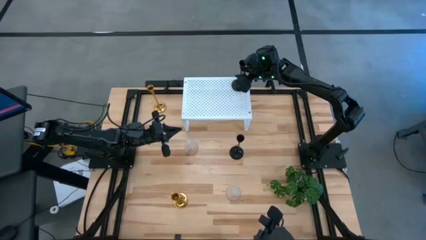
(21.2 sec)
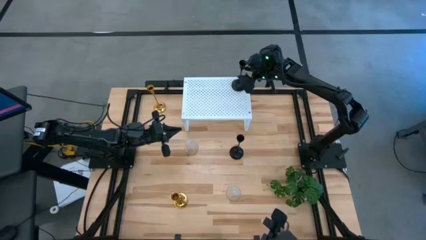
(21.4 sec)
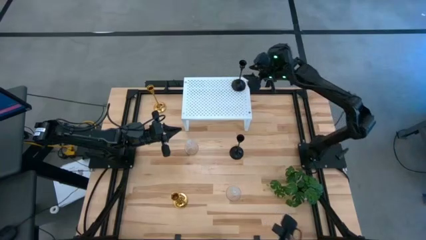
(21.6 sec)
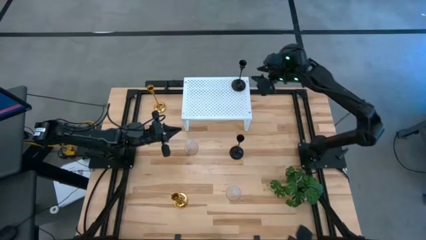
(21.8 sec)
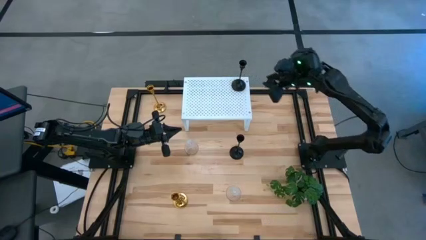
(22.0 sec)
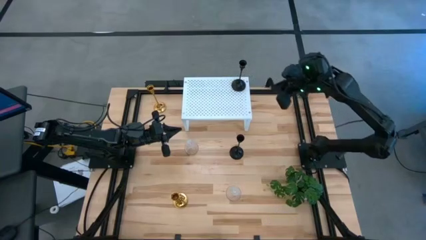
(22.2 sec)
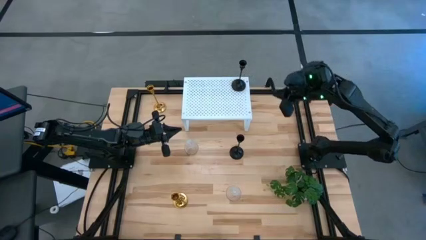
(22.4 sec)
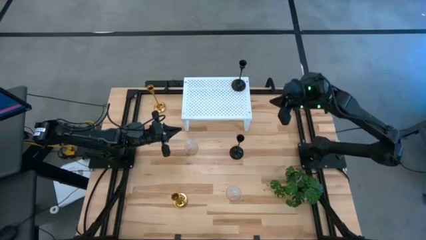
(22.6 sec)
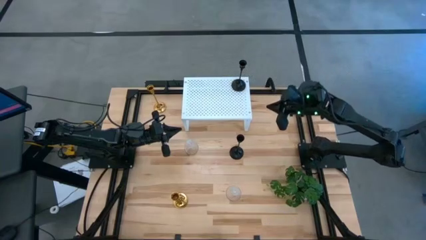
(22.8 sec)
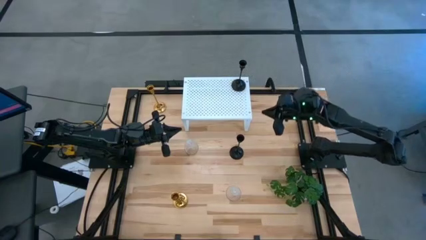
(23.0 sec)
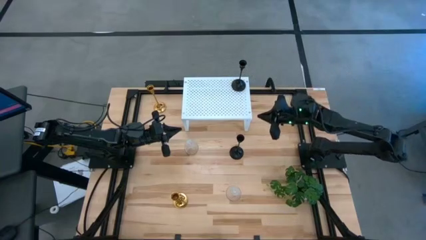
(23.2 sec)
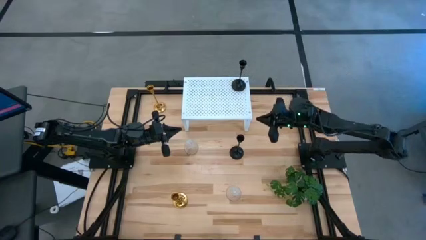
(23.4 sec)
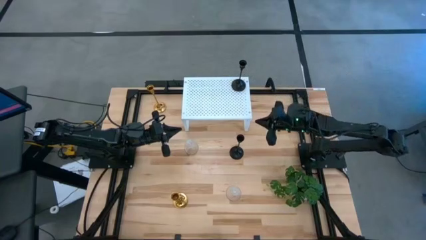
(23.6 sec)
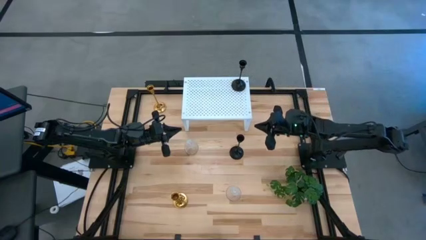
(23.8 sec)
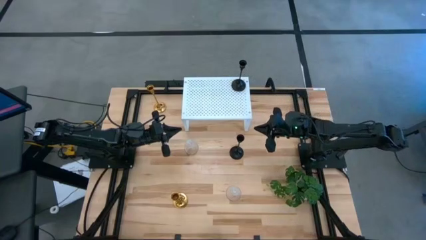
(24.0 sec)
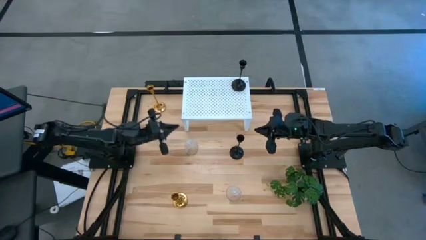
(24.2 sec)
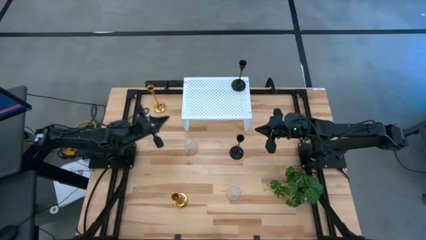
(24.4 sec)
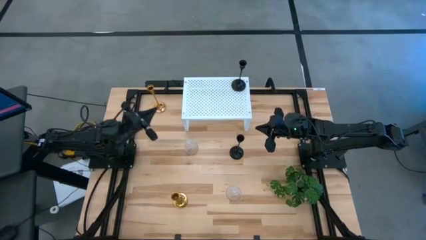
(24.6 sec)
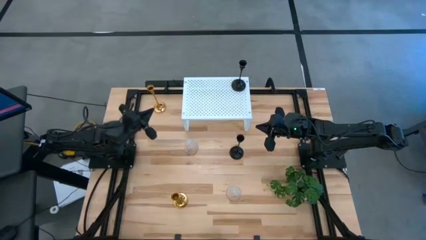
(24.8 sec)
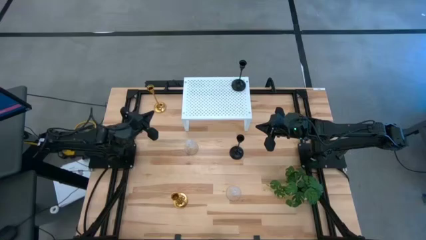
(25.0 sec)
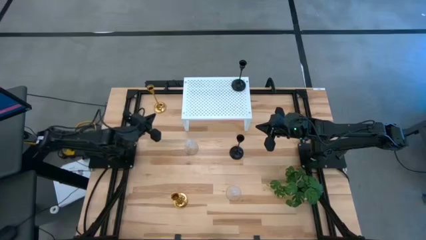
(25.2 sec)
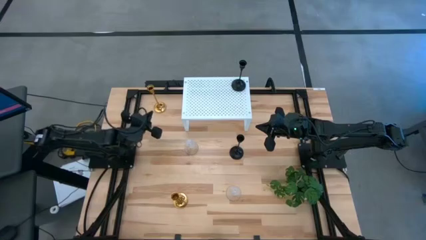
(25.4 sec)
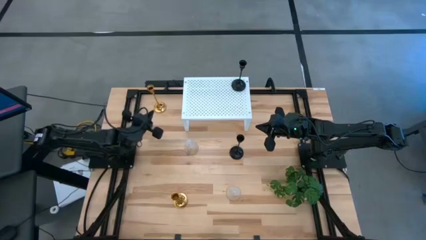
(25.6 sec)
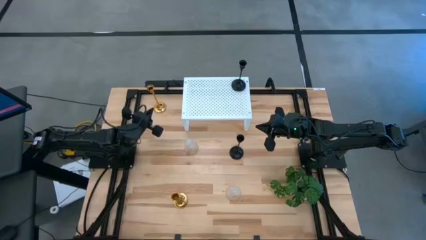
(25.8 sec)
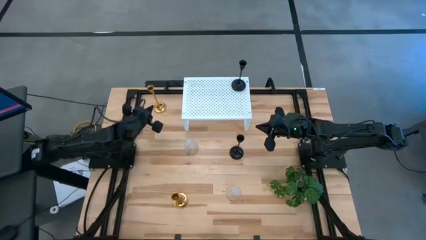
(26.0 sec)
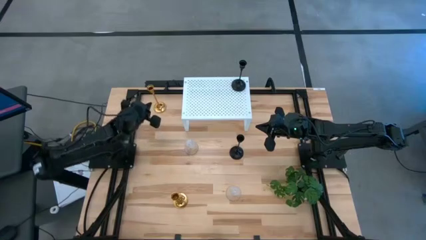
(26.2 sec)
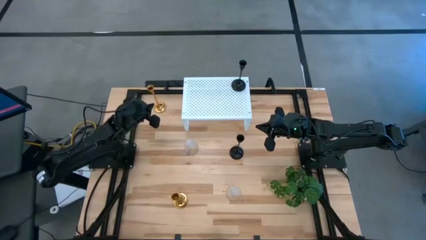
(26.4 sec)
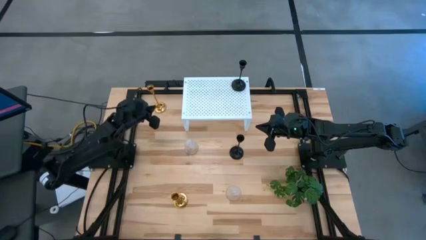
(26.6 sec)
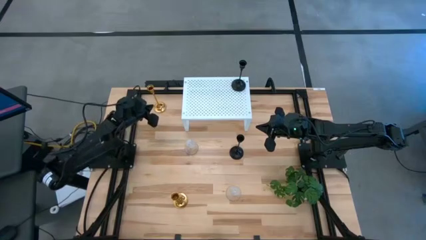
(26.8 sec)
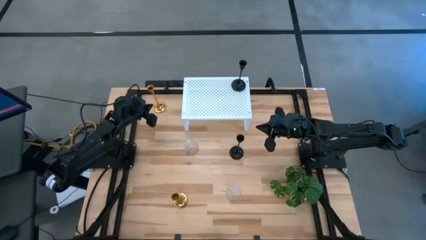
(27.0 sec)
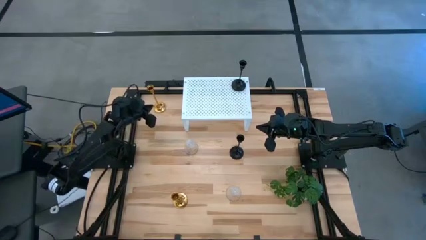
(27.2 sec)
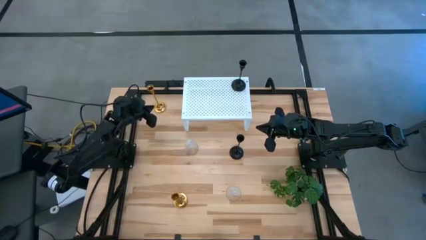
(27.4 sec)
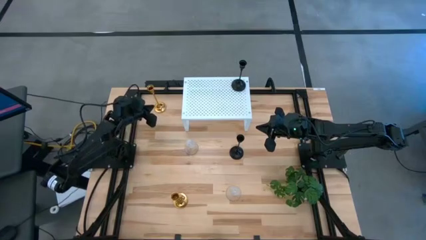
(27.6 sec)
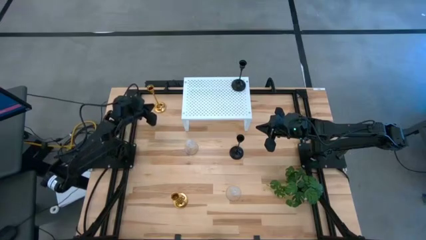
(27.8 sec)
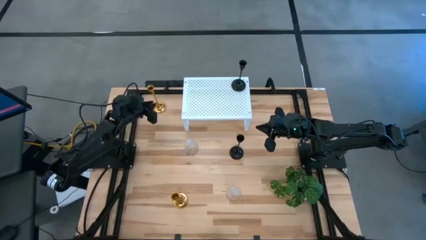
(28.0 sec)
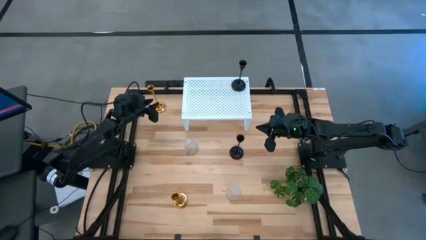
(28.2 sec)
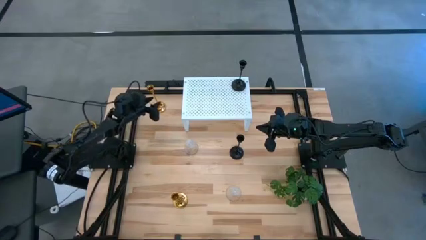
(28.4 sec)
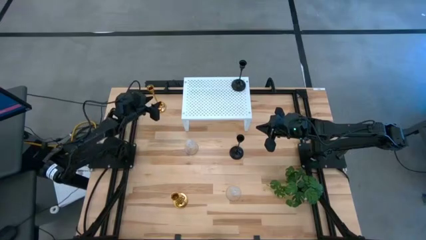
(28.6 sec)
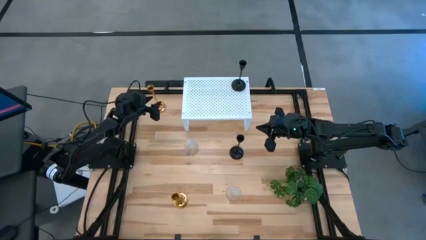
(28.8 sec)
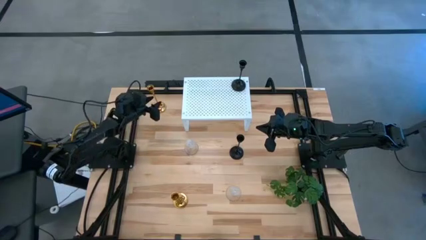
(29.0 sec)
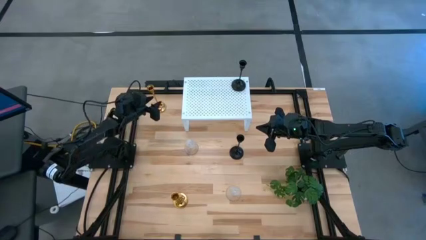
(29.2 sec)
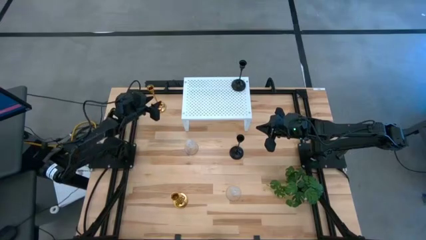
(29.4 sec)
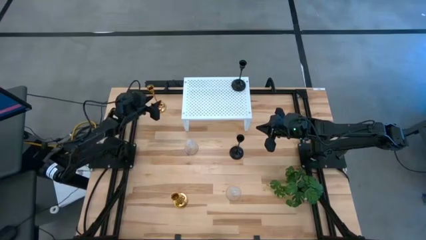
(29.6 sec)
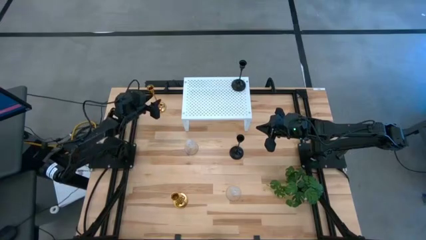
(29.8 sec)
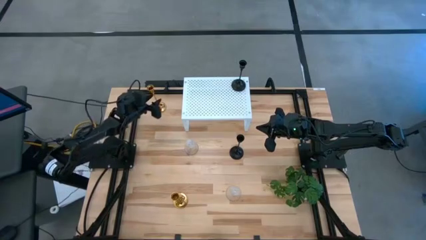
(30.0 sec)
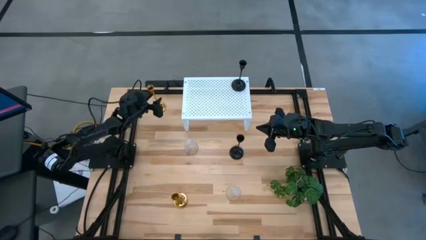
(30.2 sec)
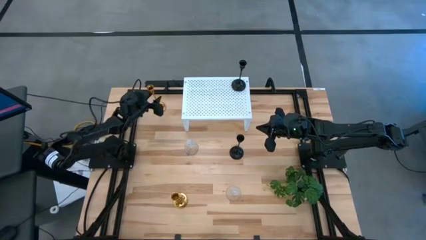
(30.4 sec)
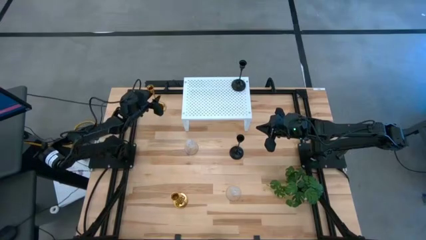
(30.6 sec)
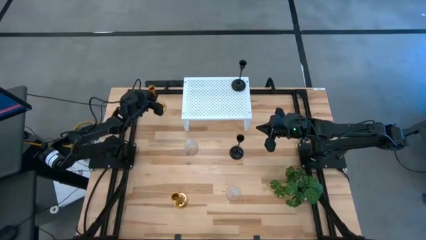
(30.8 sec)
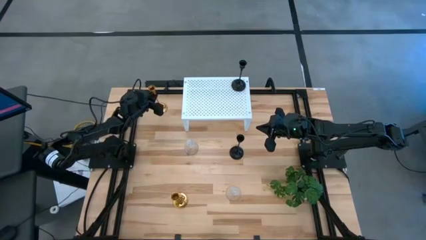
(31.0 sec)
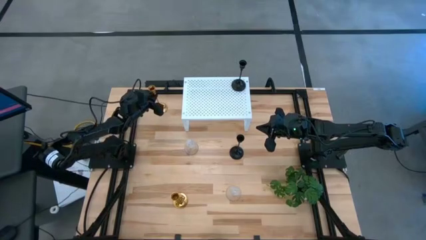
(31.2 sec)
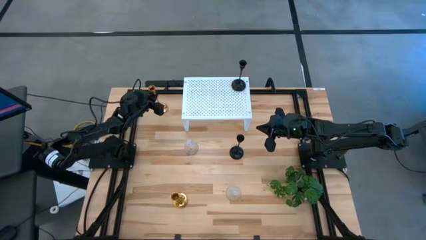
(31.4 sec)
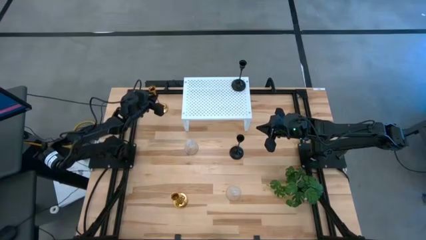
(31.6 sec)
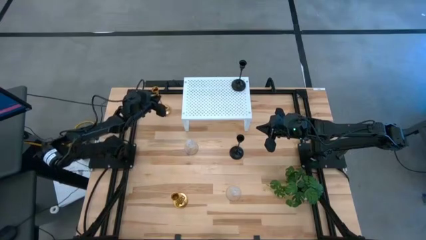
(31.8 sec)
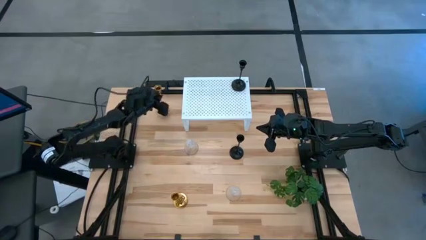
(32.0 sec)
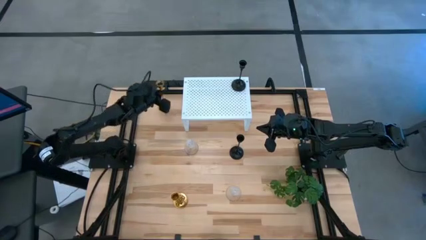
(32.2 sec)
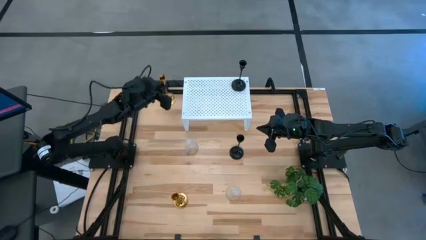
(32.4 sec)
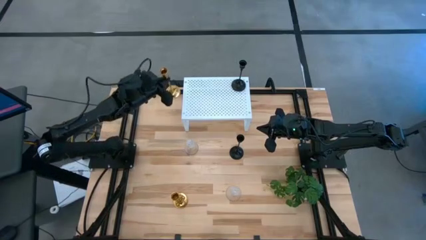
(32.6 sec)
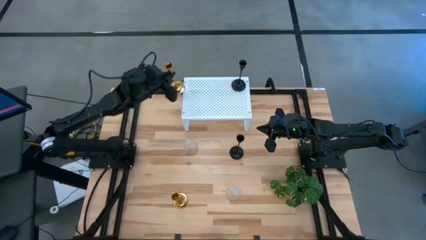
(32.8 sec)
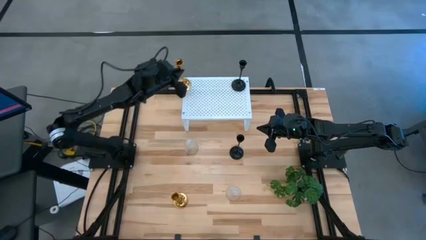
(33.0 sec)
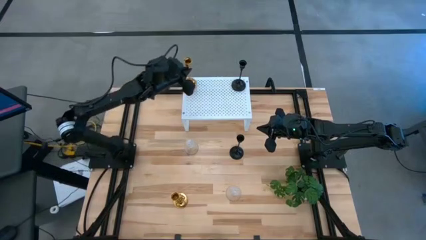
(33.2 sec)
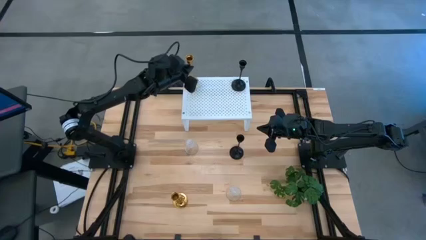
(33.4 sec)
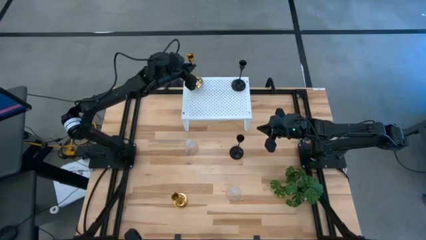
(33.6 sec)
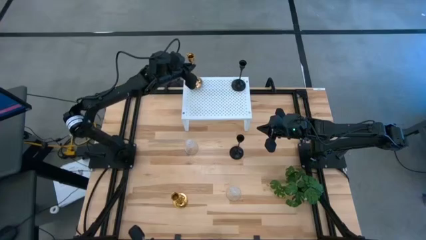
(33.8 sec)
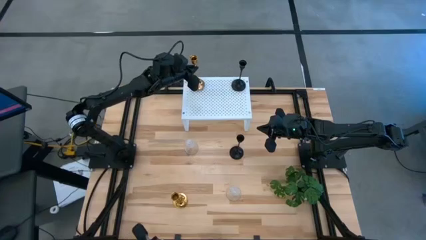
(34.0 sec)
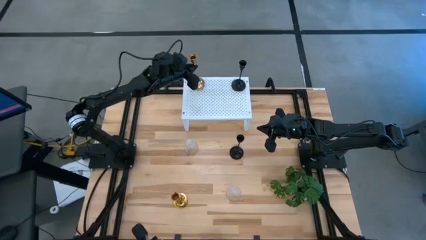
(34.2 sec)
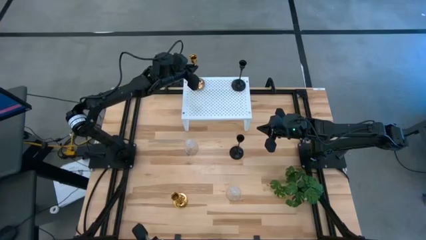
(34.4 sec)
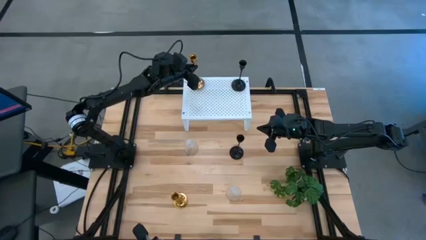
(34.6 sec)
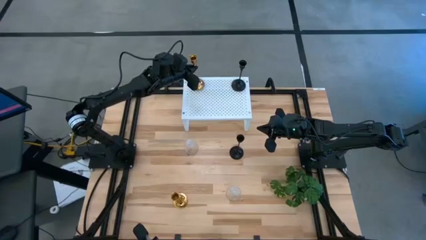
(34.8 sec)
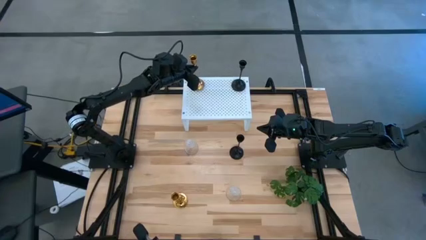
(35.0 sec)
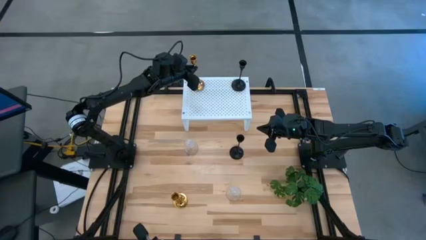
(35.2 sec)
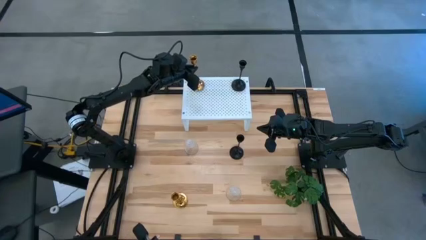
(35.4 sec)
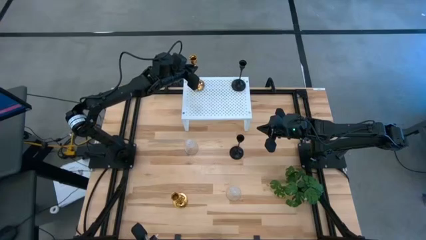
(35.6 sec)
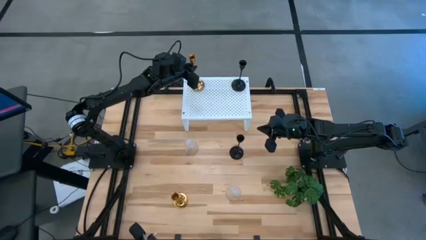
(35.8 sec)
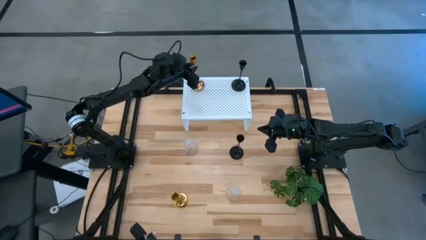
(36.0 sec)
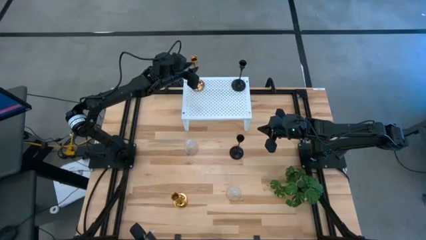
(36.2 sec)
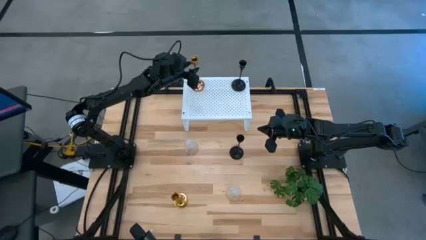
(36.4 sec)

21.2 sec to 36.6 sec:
Task: Pick & Place candle stick holders
Put the top gold candle holder on the shelf
